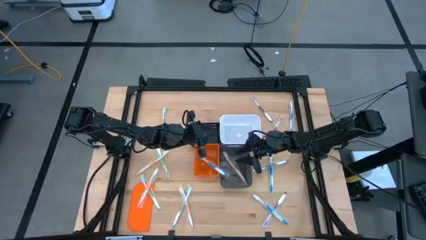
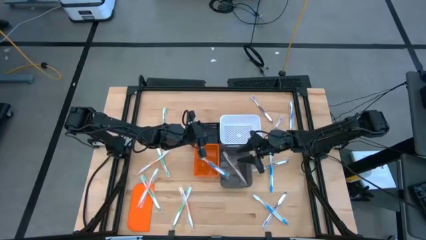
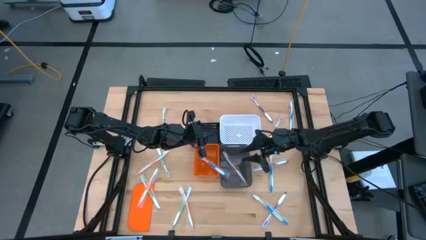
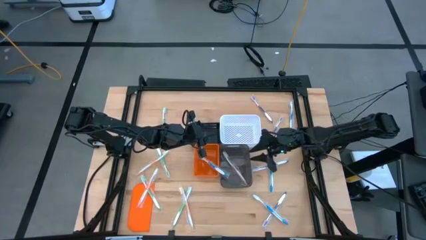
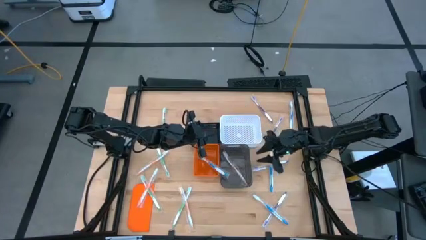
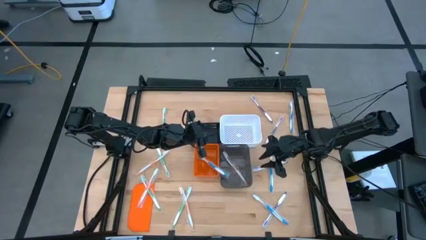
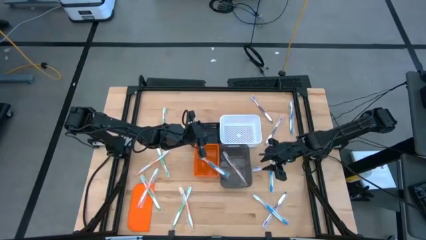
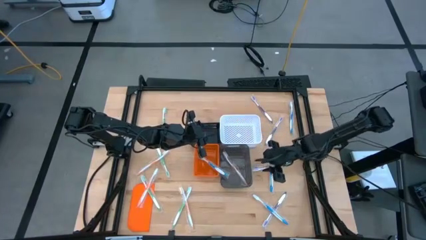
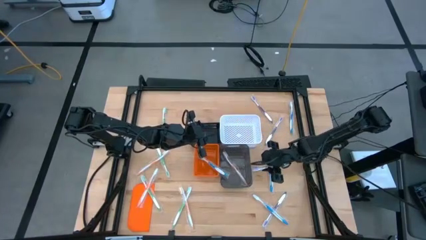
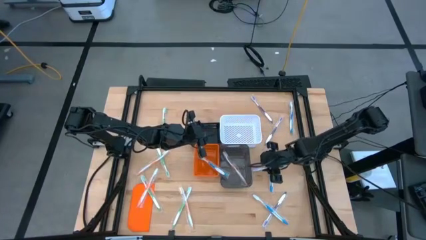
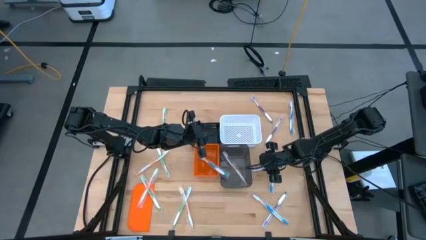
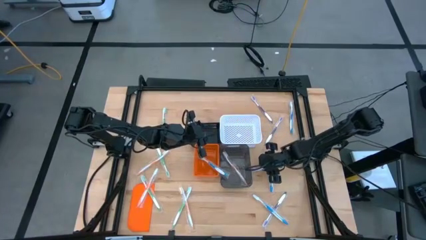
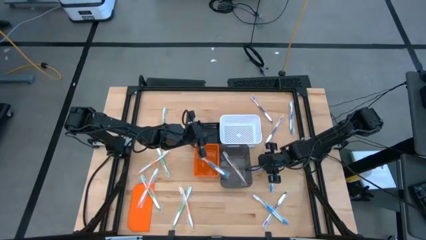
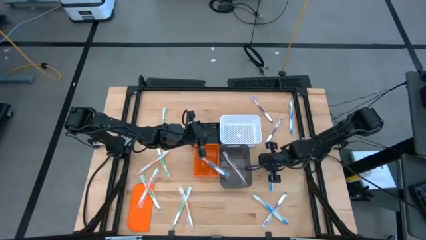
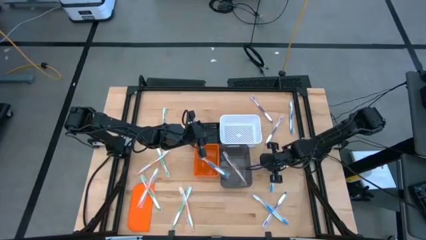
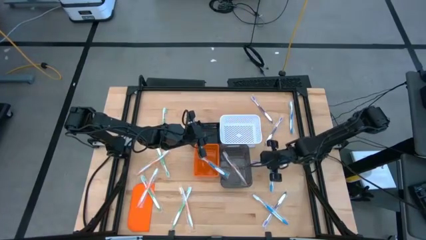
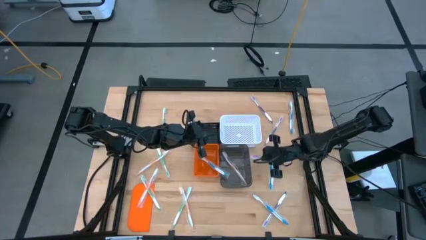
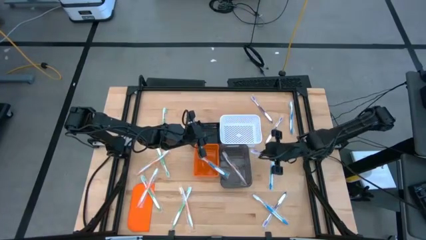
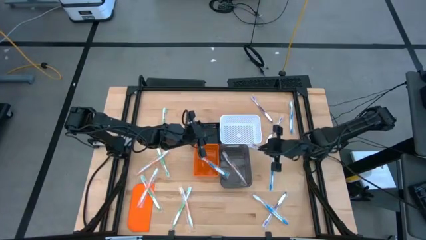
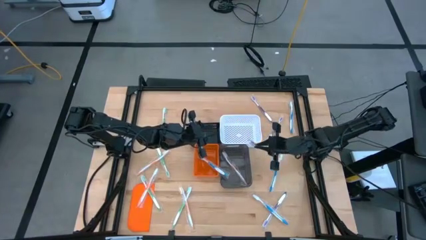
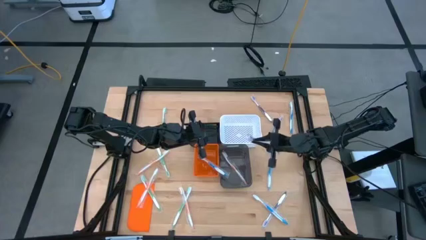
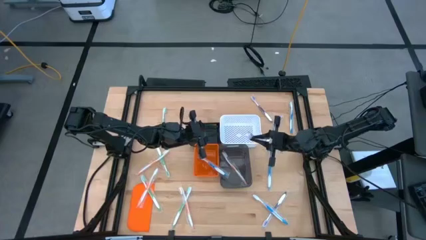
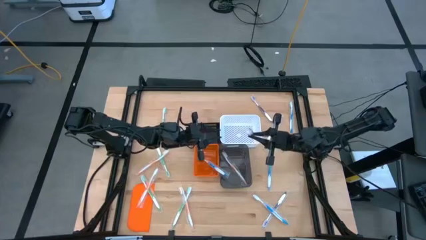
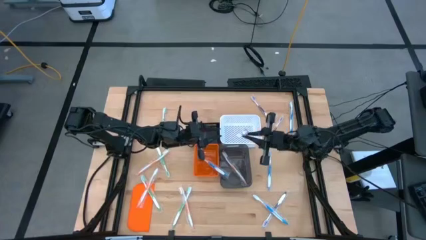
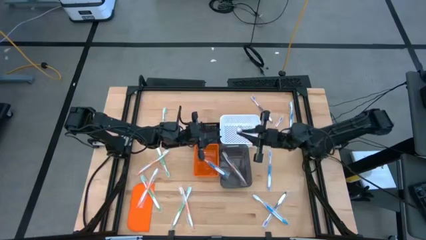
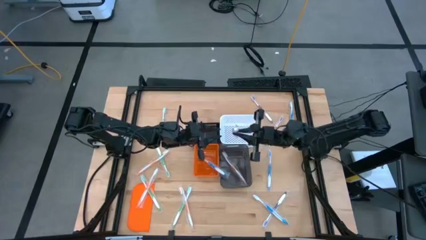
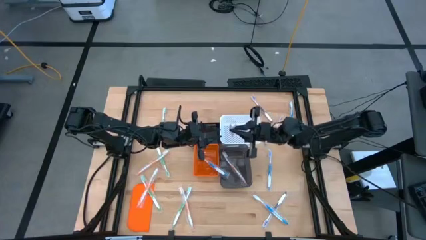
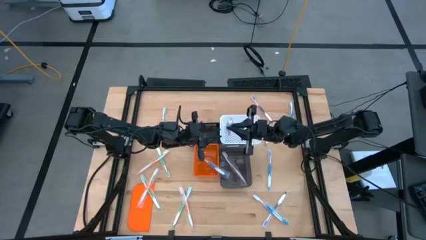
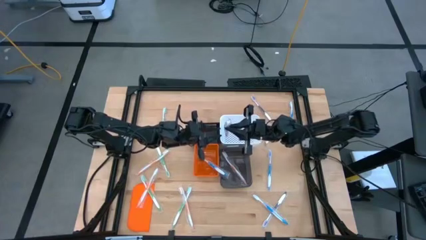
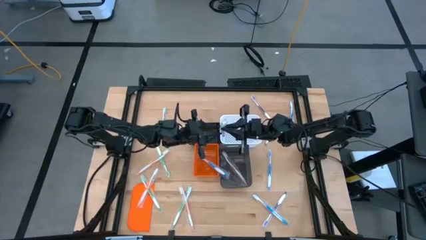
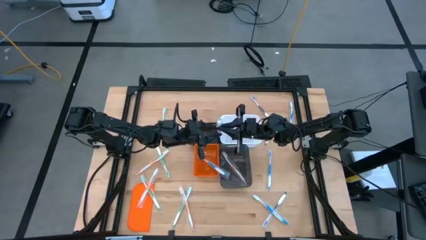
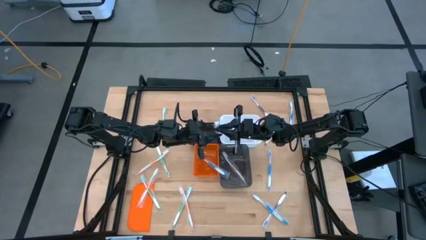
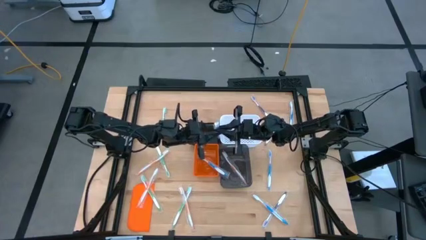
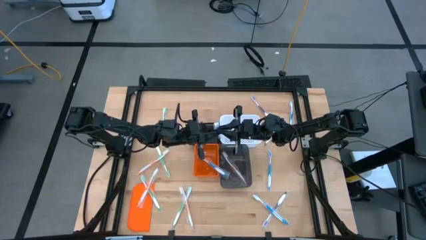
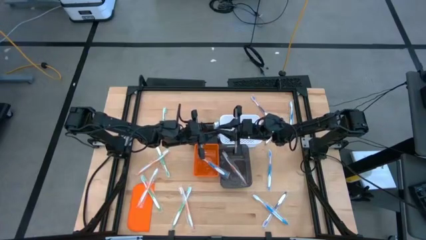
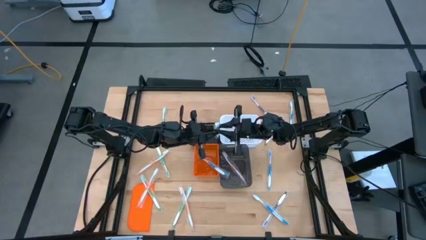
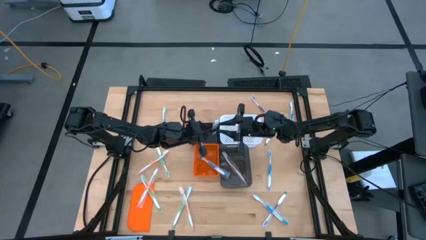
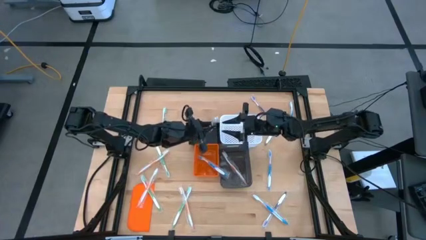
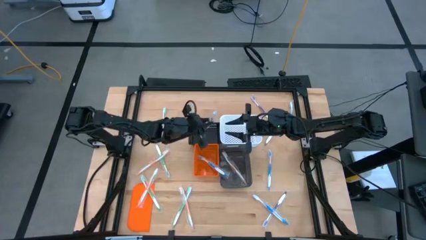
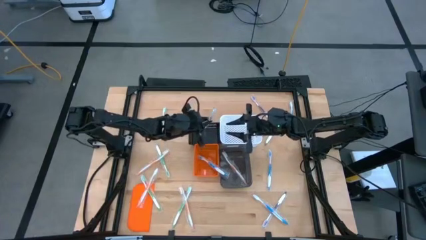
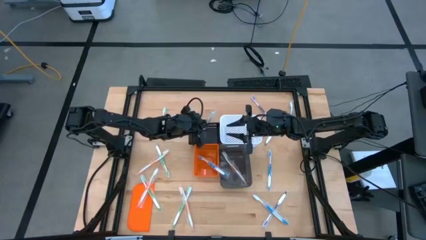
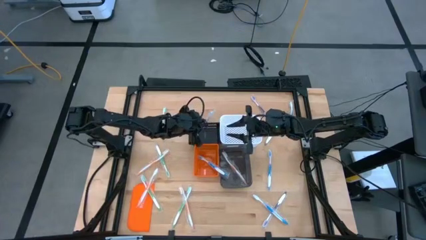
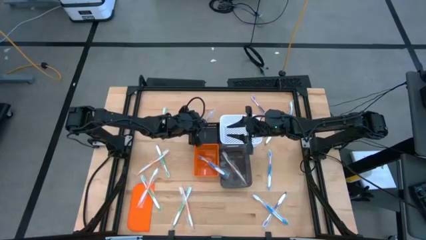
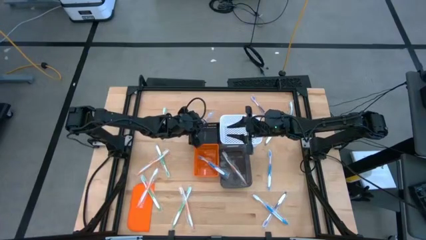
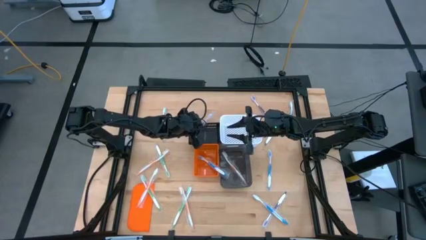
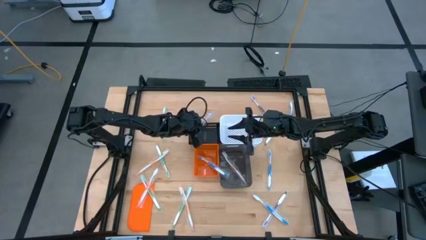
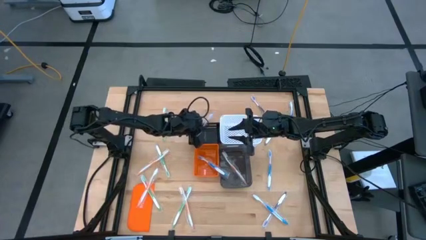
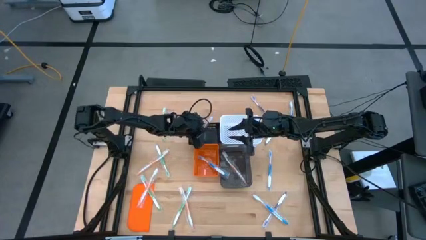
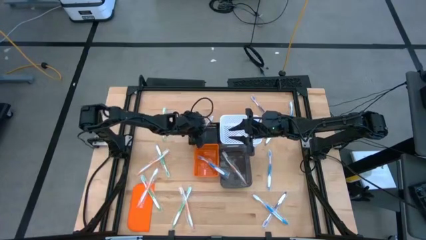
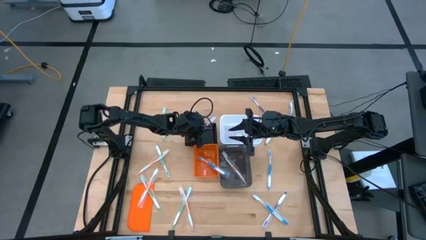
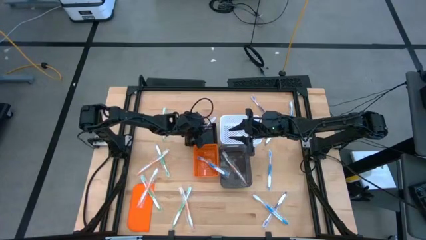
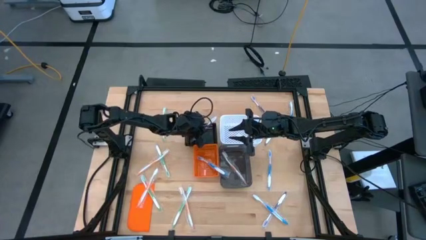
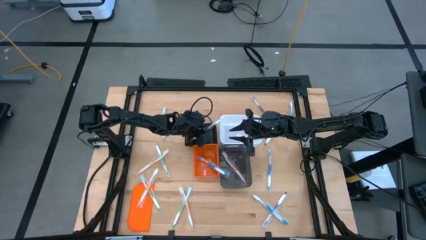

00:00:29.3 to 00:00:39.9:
Task: Pick & Place Toothbrushes
Put the violet toothbrush into the black bin

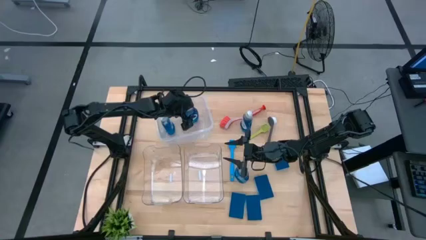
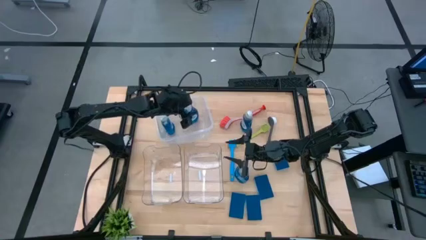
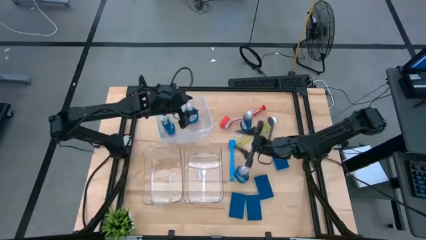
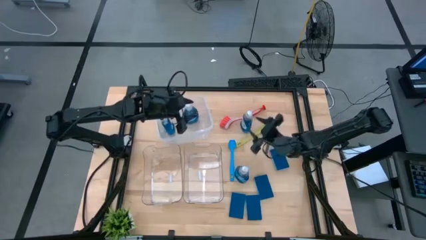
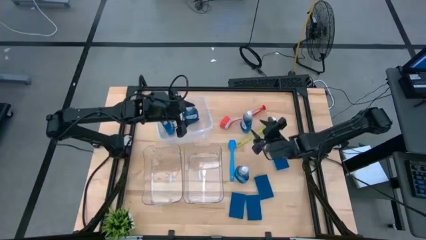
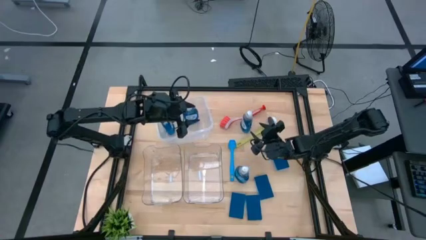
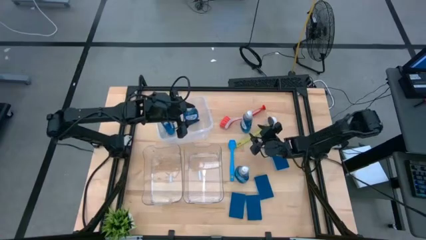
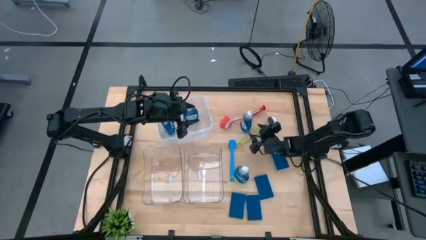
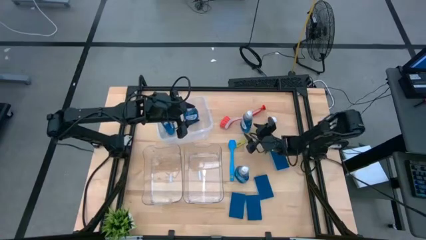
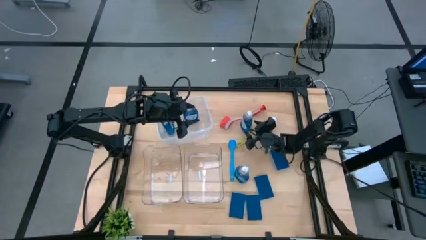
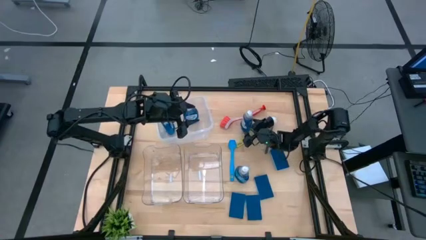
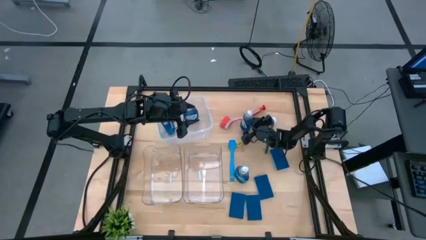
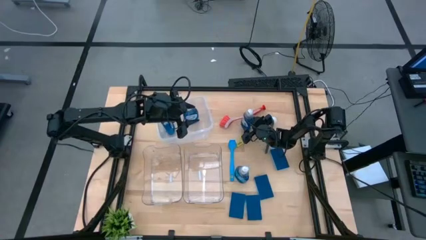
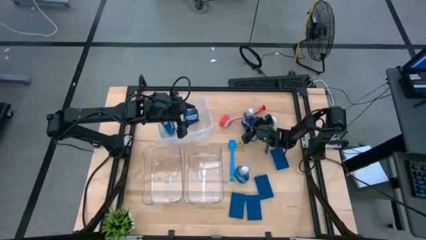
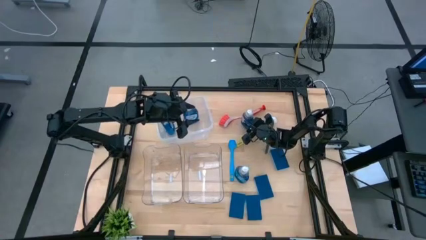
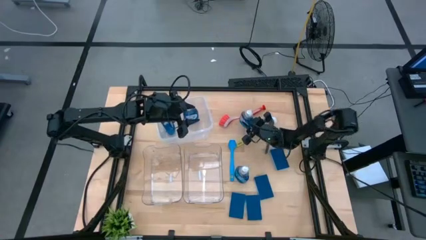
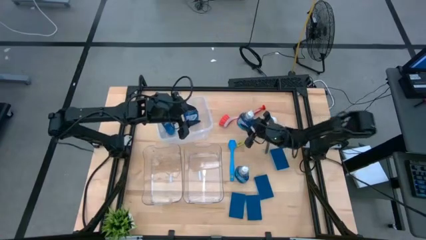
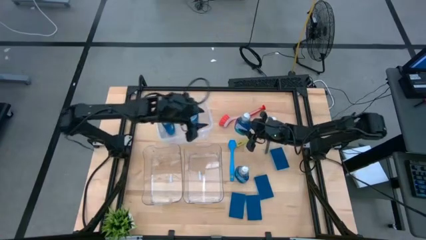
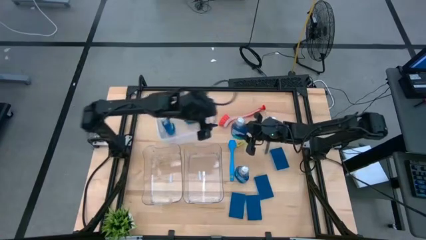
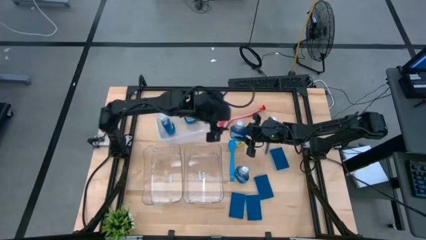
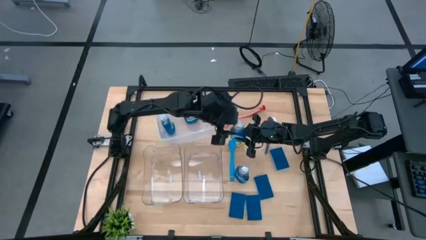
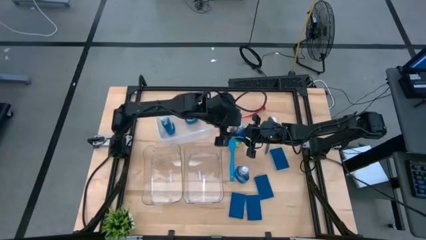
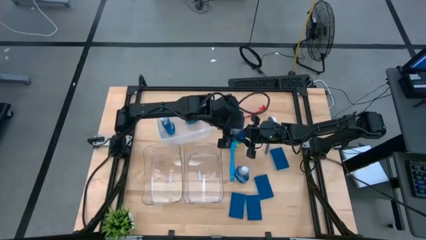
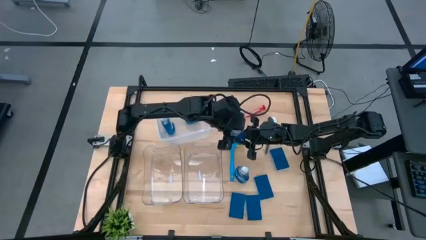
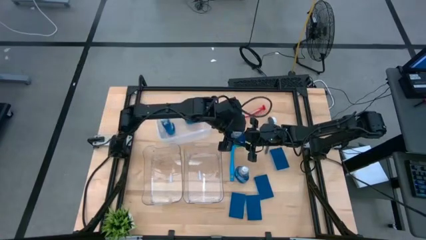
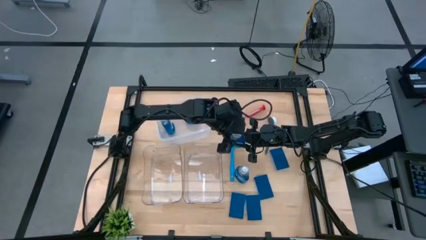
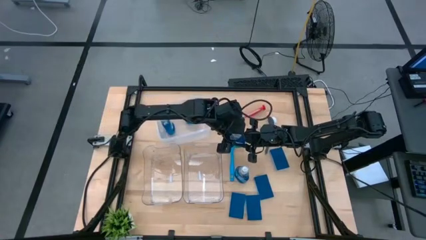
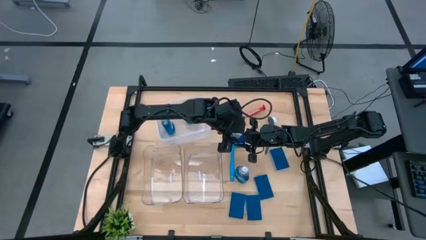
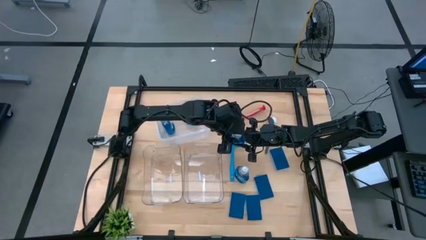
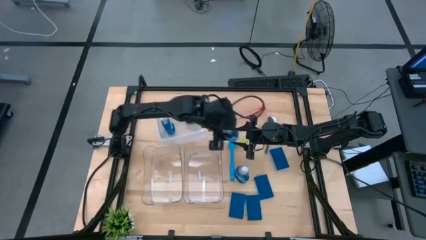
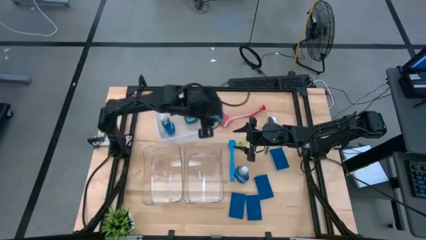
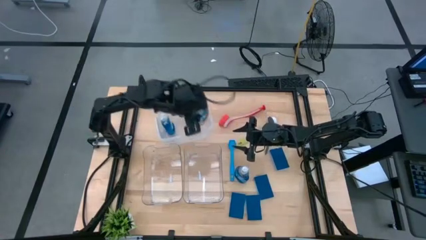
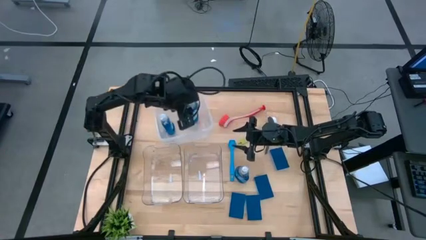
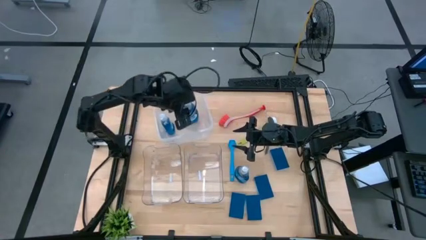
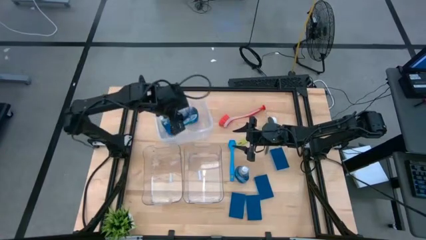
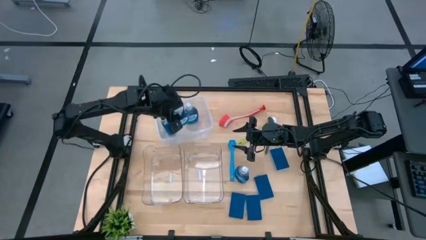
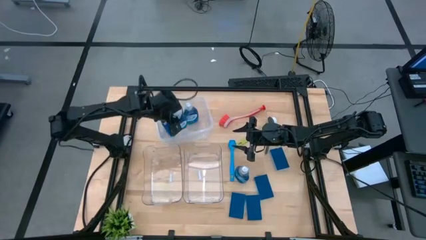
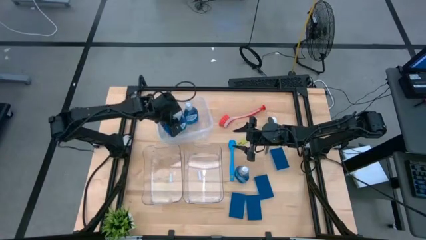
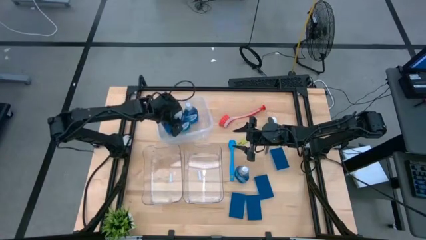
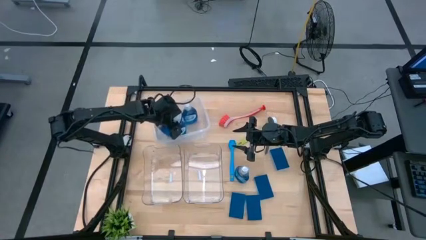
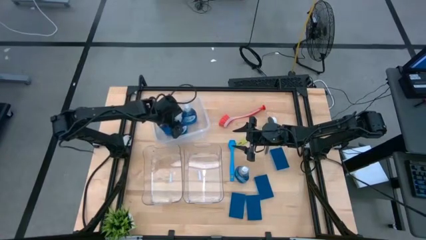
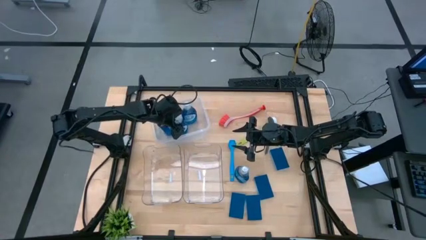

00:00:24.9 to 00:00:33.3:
Task: Pick & Place Kitchen Sink Supplies
Put the blue dishwashing liquid bottle into the white transparent bin
